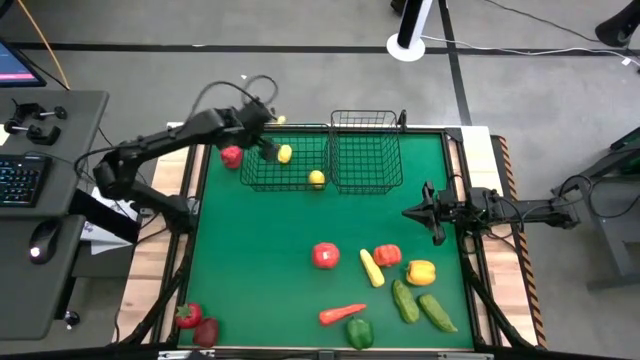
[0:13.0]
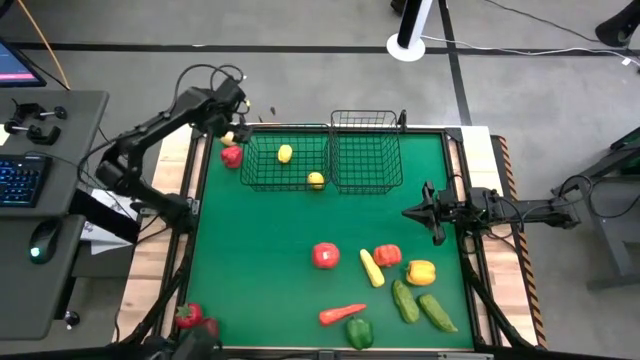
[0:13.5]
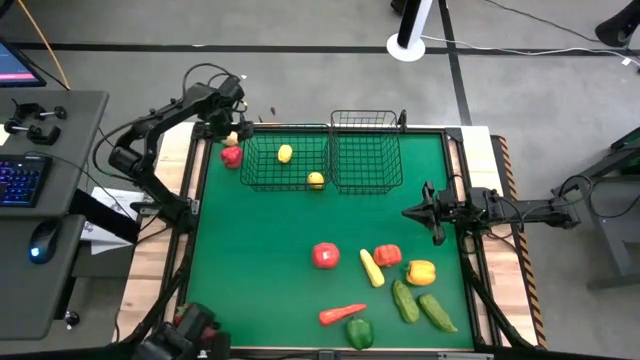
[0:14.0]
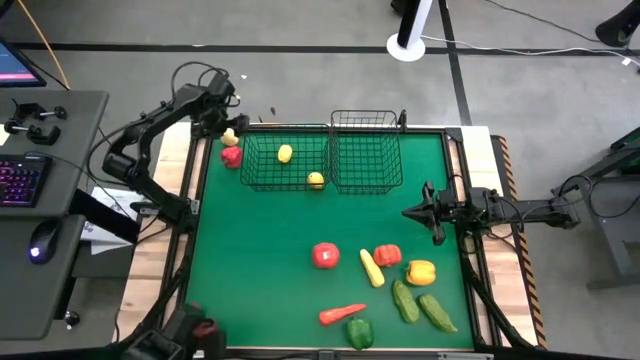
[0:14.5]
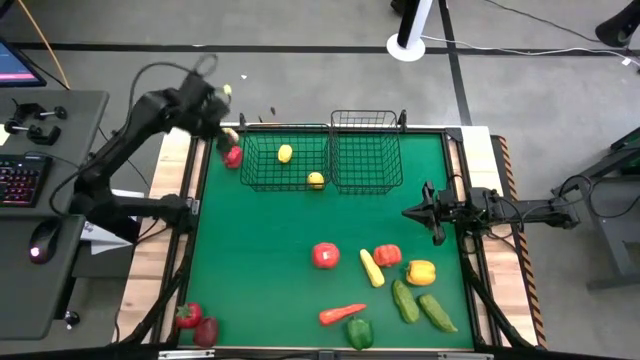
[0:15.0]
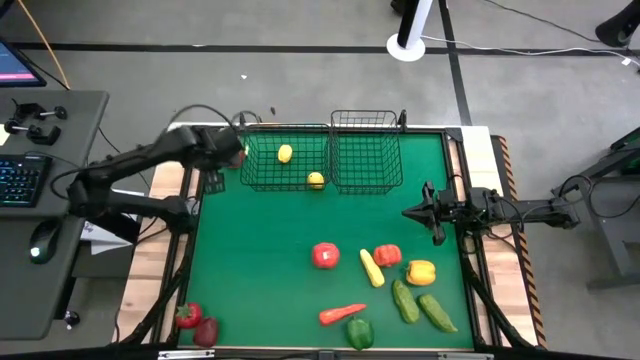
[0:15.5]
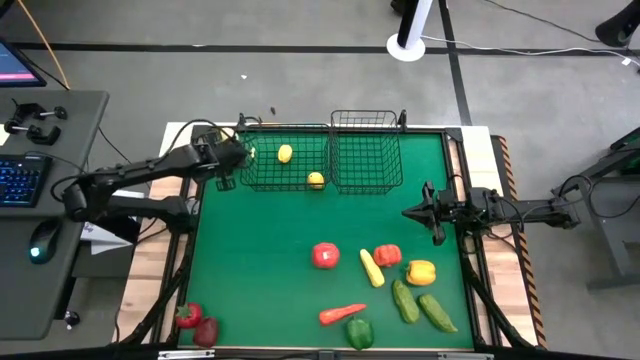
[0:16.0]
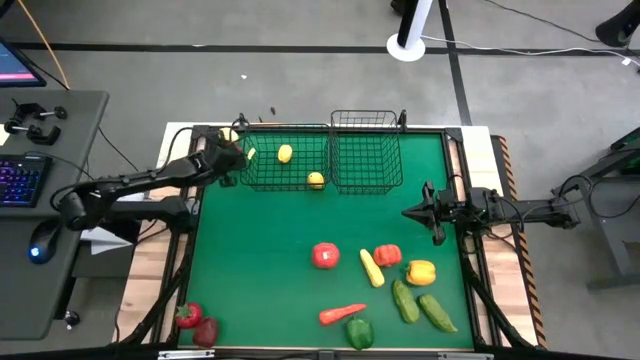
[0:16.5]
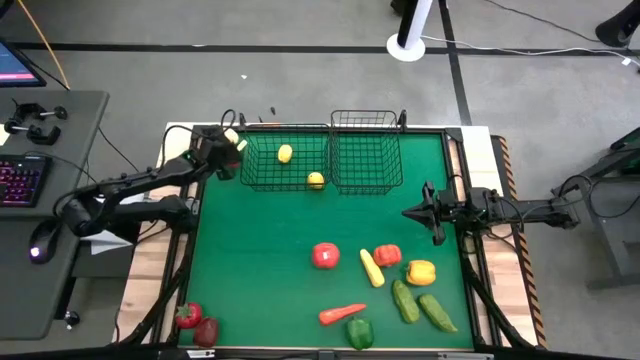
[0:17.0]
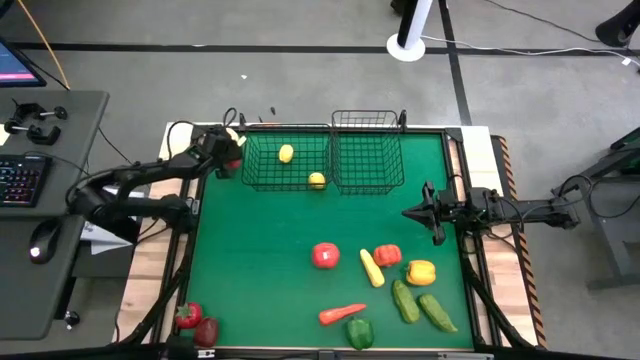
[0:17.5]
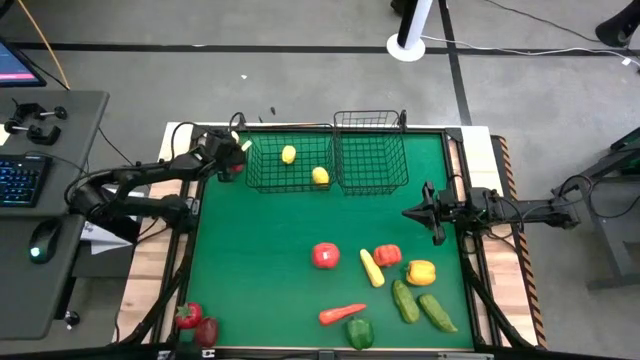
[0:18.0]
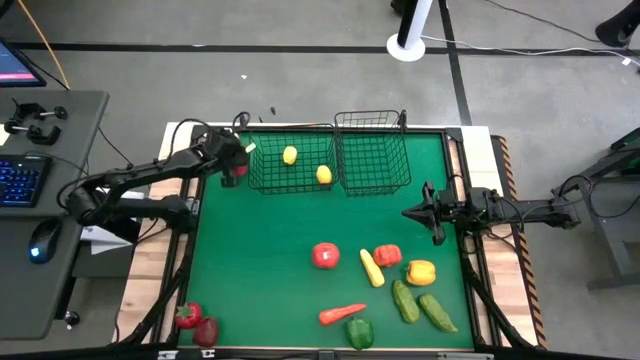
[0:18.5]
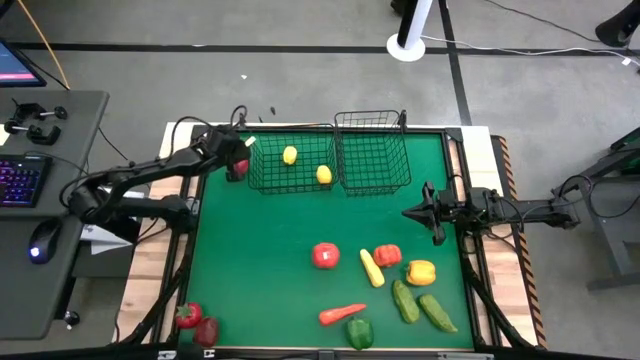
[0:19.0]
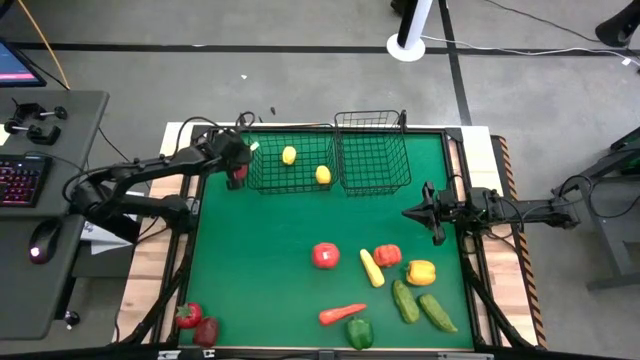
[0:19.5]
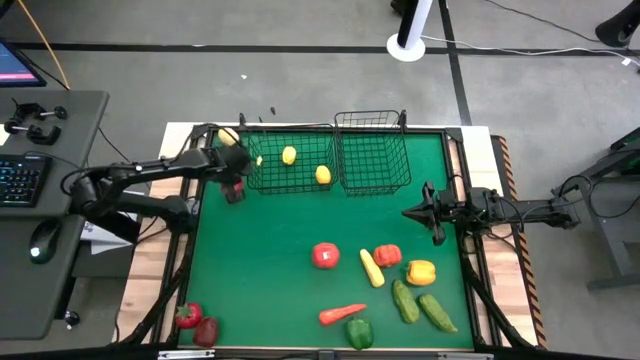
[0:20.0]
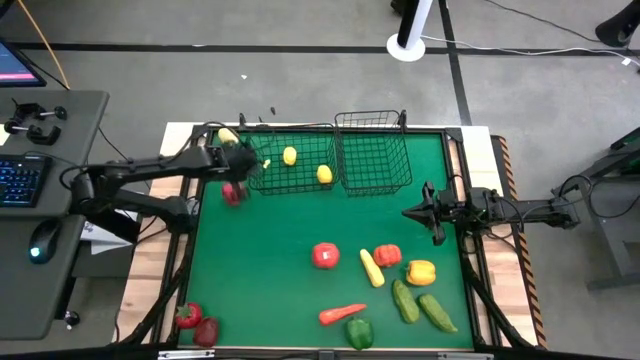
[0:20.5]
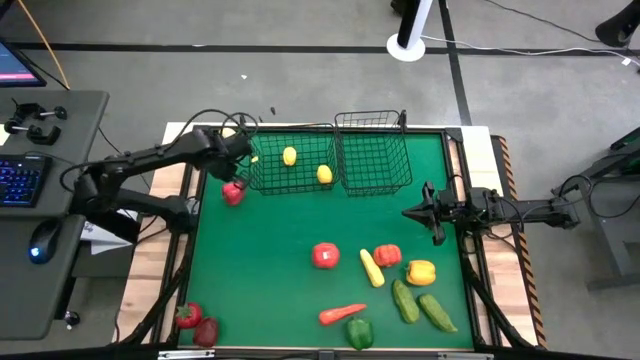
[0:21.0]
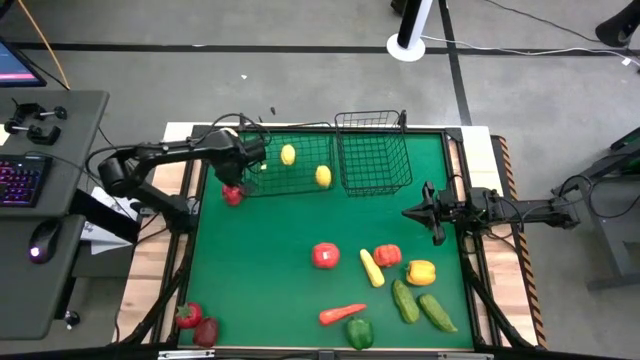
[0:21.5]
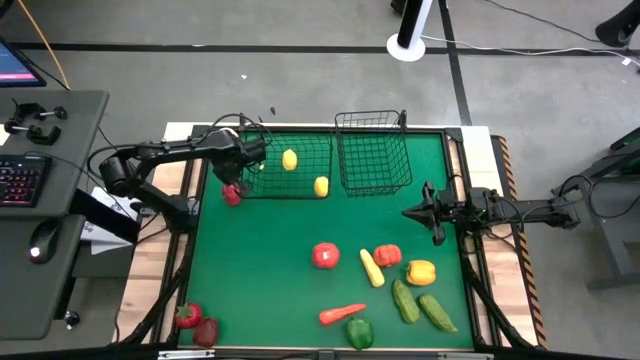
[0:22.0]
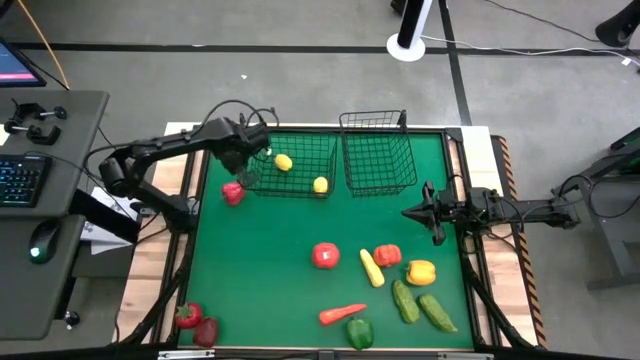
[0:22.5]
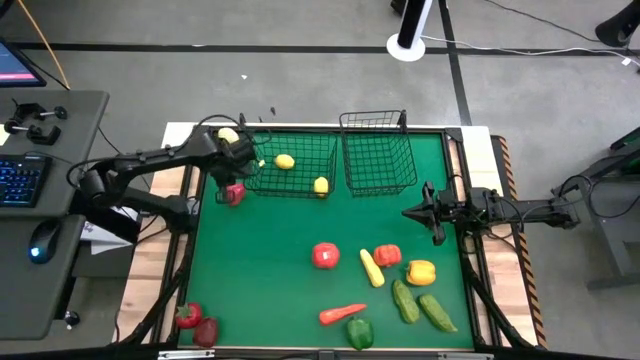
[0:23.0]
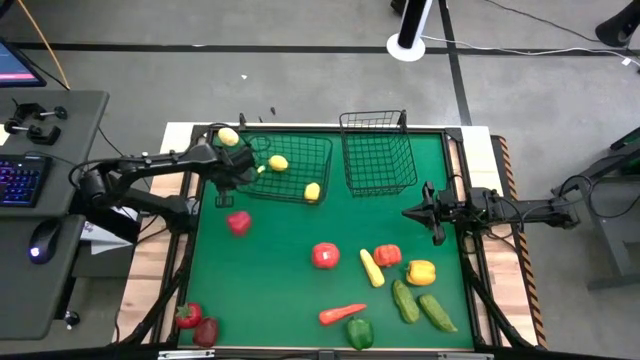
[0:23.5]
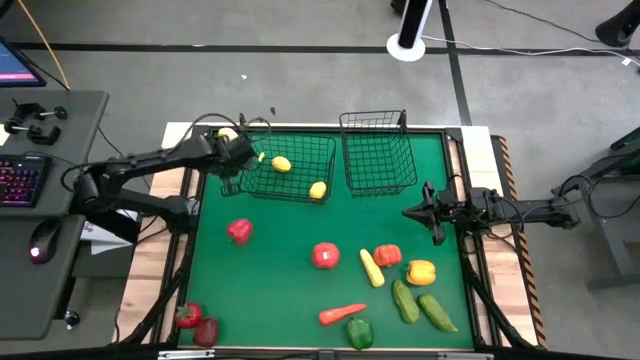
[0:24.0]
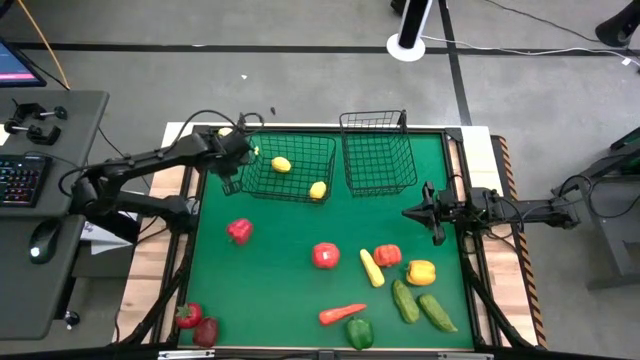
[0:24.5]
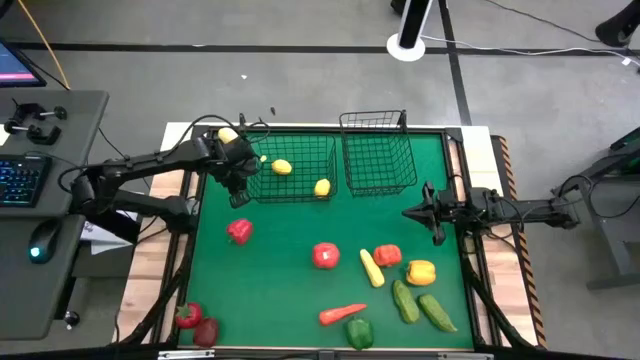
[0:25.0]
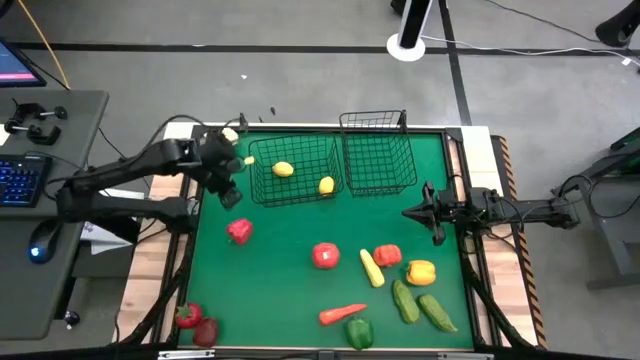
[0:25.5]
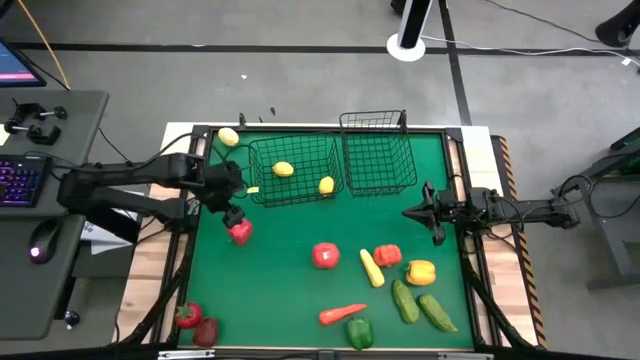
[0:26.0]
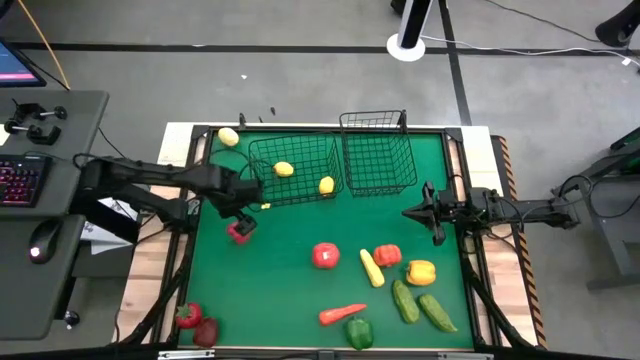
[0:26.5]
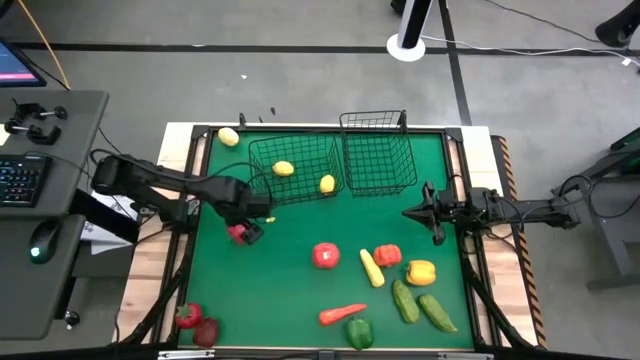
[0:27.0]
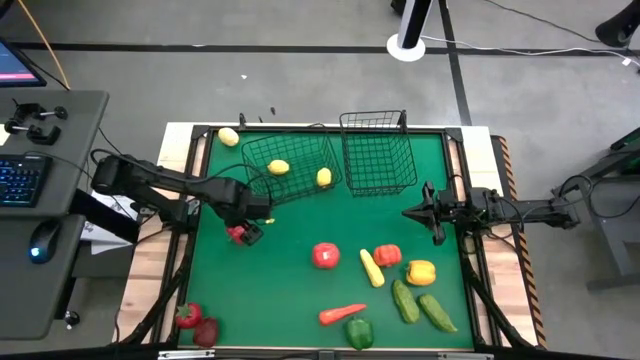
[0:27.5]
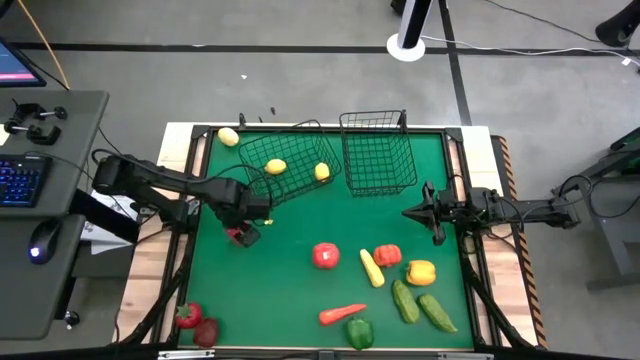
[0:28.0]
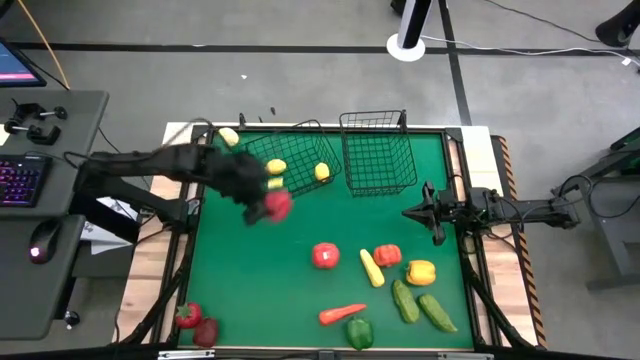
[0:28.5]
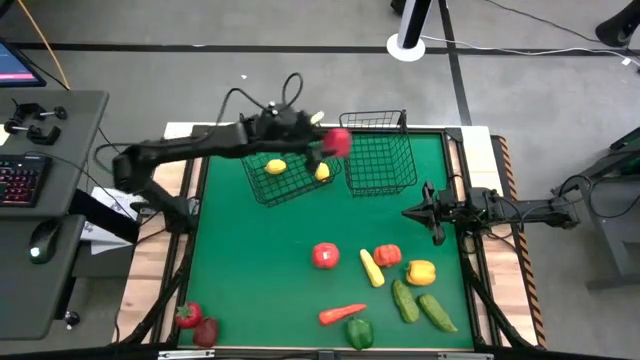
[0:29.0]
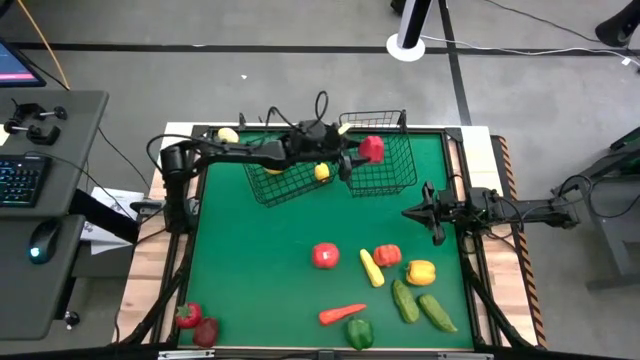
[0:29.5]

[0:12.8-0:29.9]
Task: Sort produce into baskets
Put the red bell pepper into the right wire basket

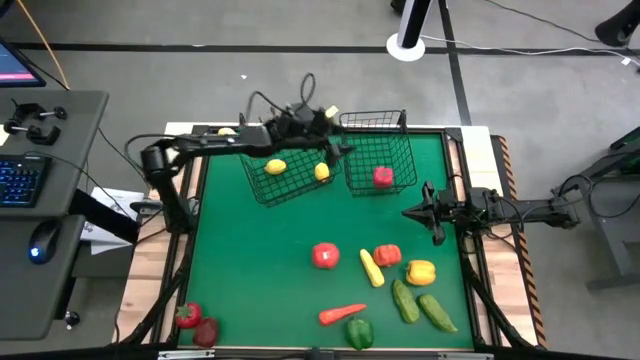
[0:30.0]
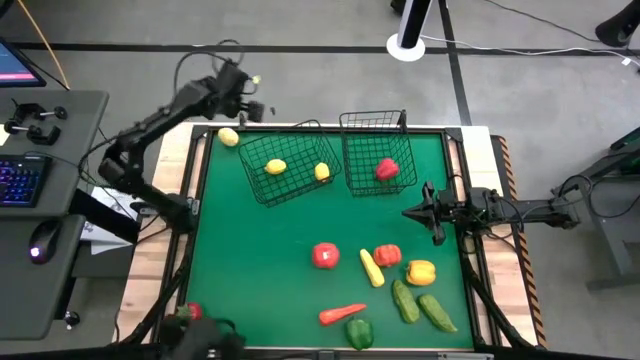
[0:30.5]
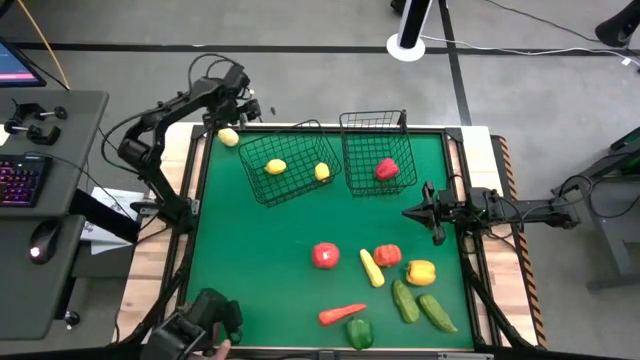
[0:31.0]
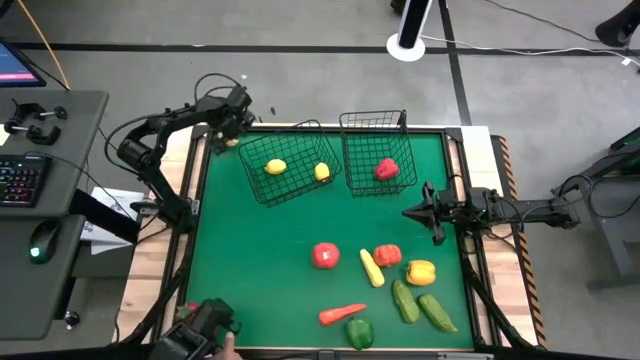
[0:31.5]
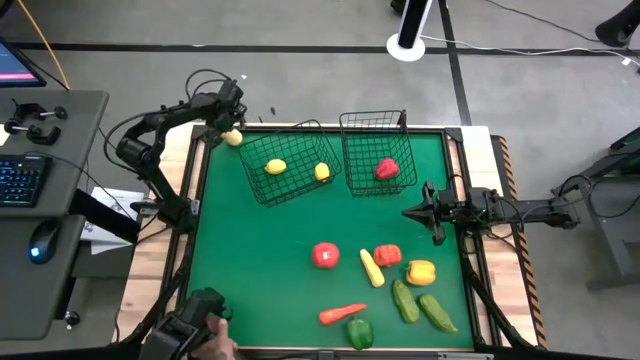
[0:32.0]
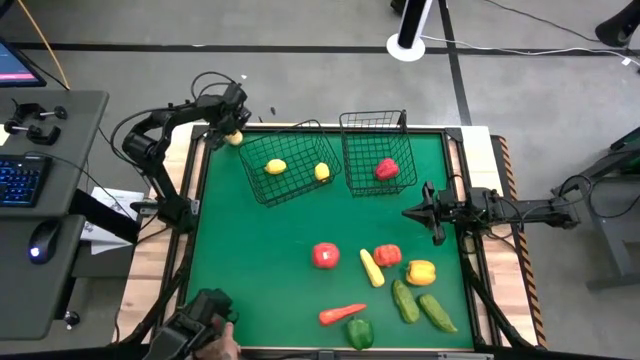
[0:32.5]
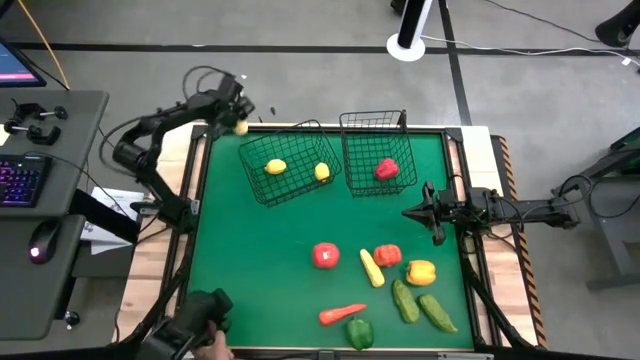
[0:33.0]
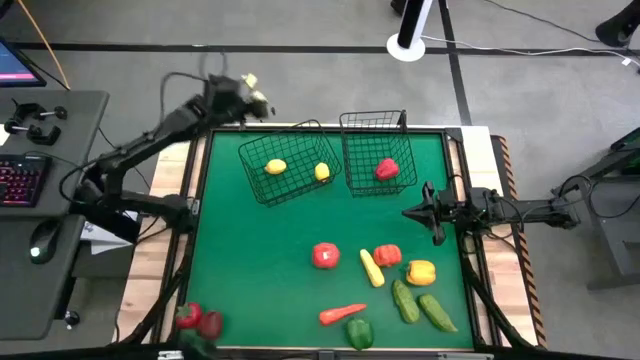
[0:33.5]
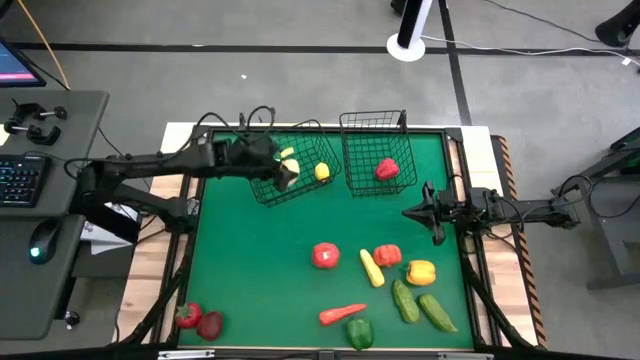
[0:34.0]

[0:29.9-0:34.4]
Put the yellow lemon into the left wire basket

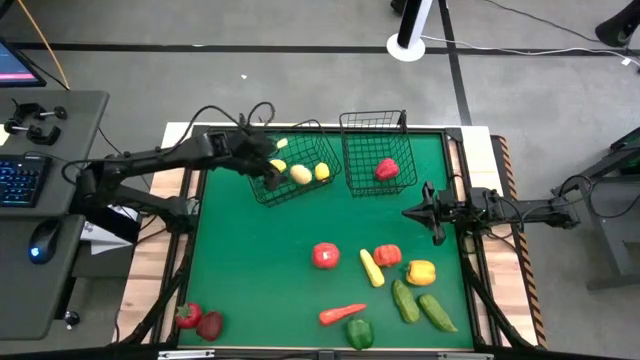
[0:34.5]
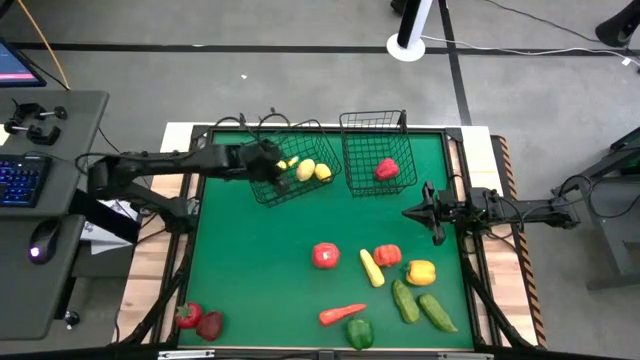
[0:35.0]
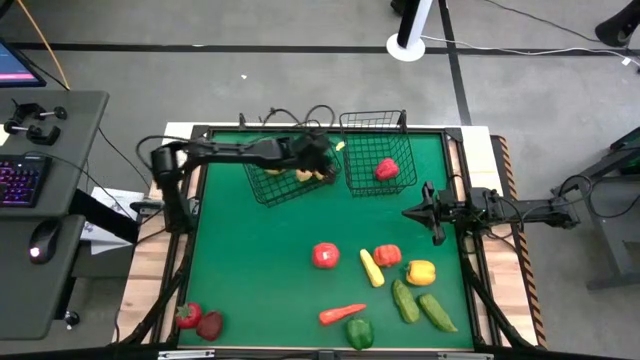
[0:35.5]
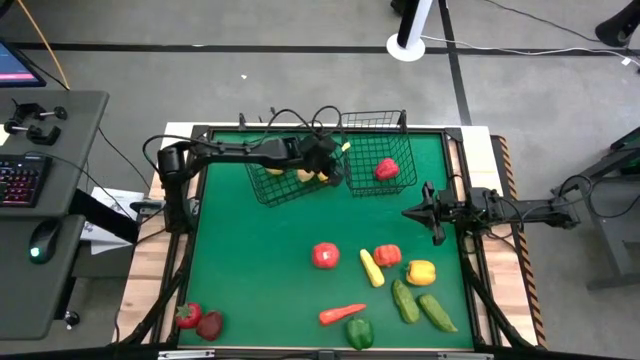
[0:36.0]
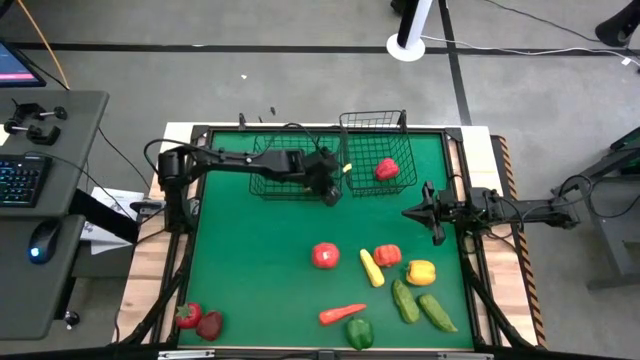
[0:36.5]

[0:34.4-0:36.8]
Adjust the left wire basket
